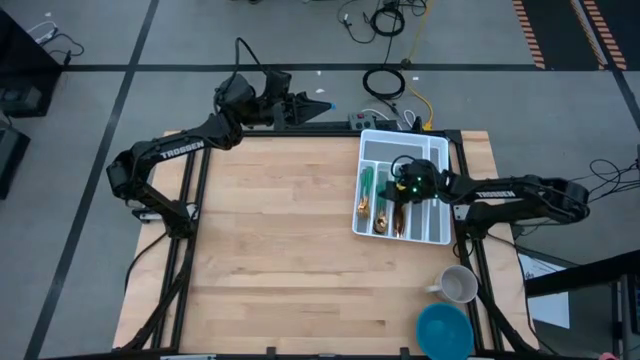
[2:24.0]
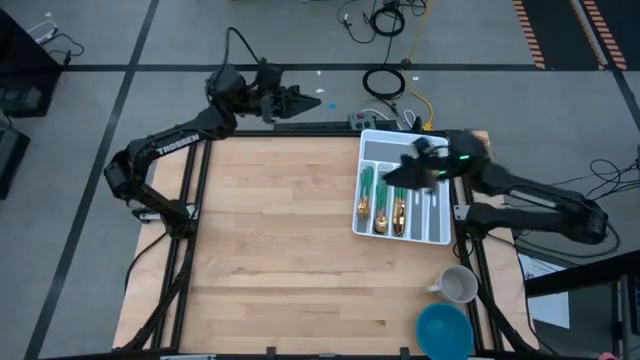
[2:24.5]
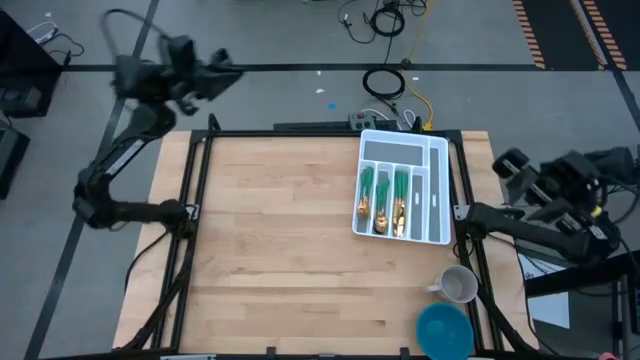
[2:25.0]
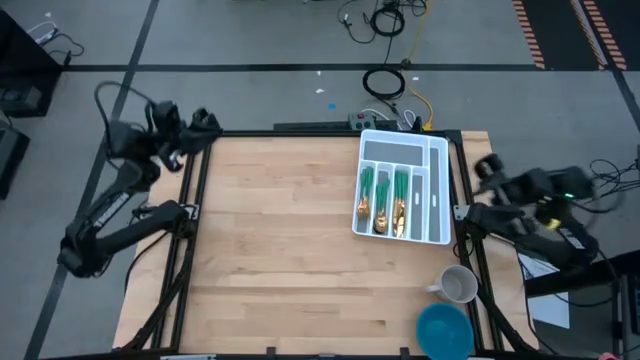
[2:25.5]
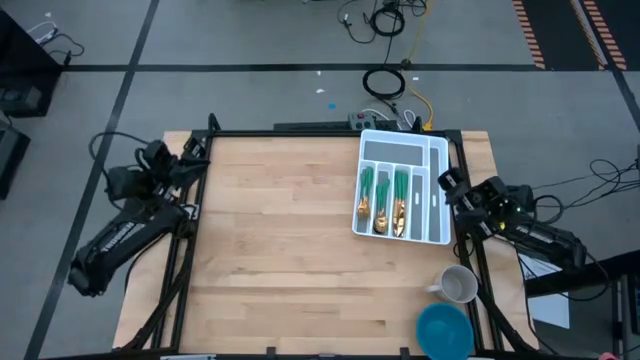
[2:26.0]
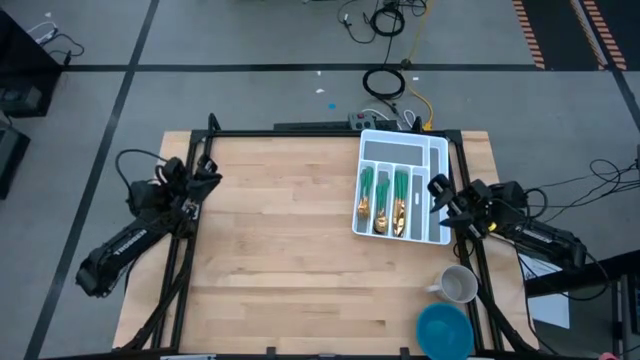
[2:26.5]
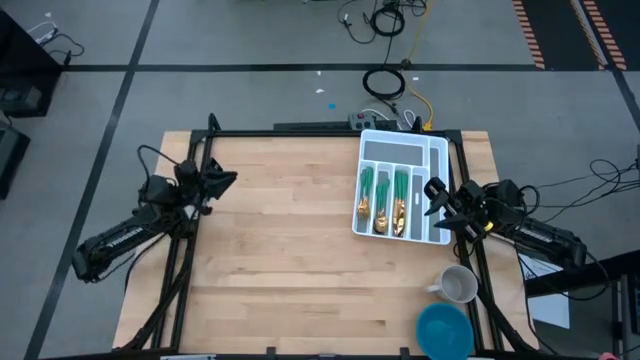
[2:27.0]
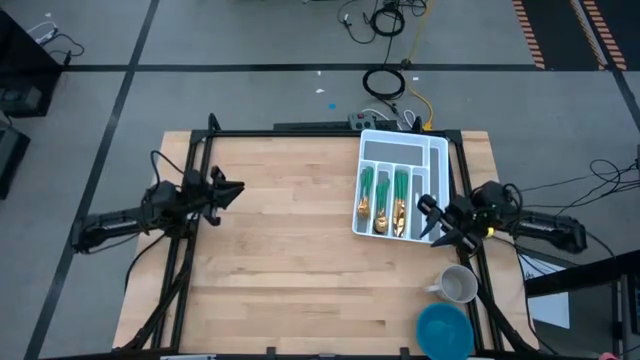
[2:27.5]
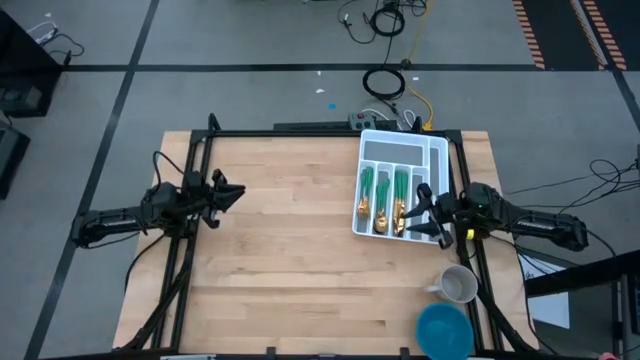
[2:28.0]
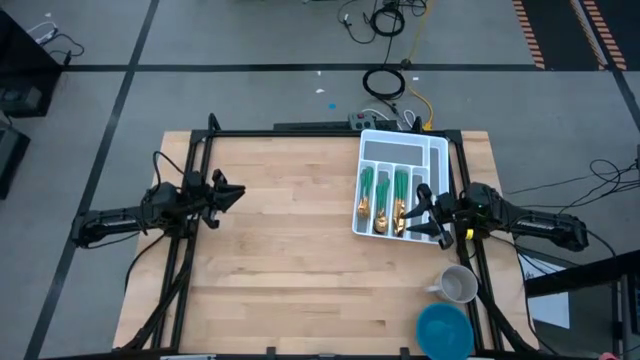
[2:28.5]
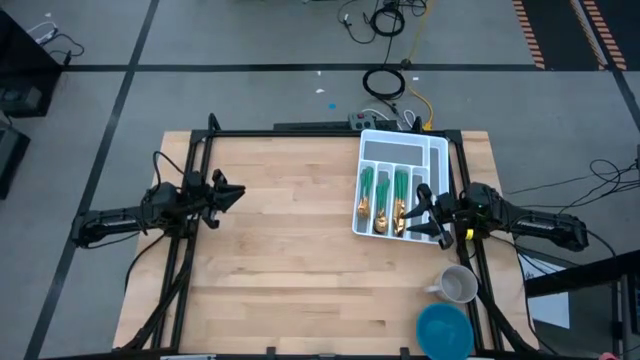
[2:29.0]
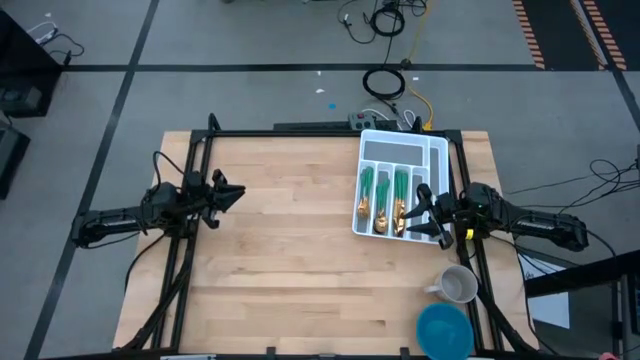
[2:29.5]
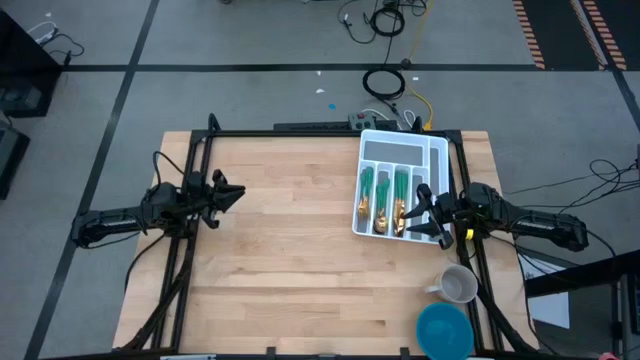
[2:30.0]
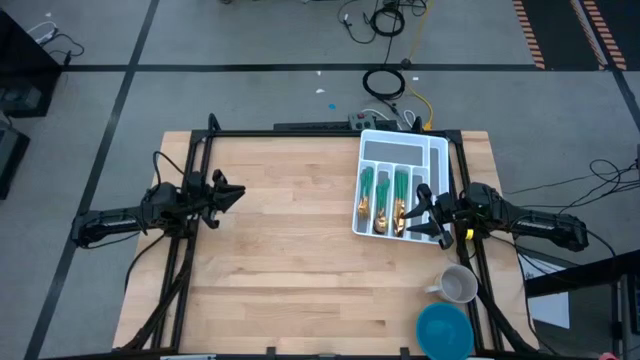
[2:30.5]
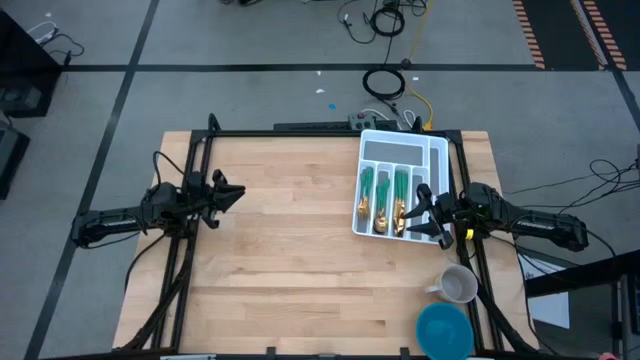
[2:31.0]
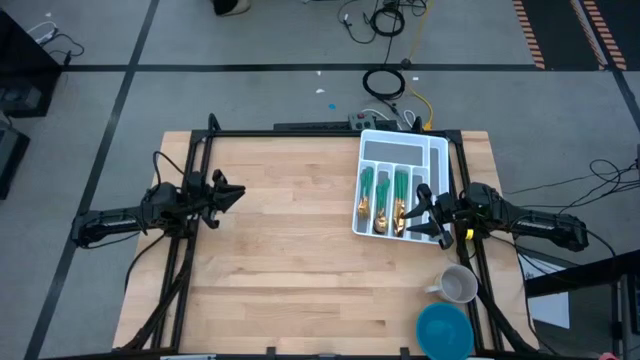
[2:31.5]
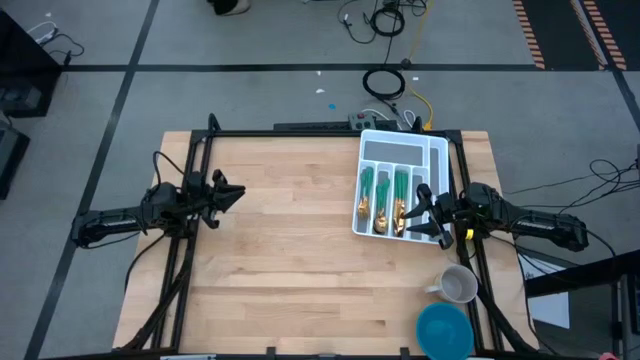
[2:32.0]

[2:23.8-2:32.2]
Task: Sort silverware
Return to Home Position

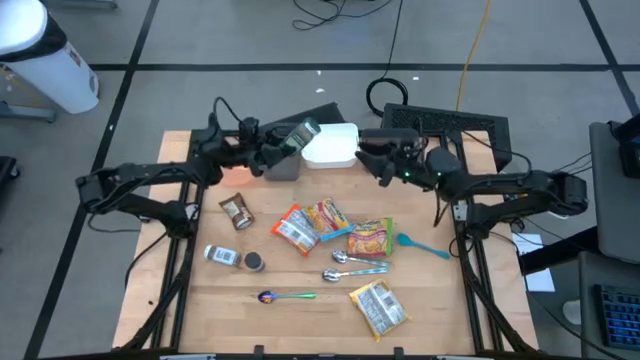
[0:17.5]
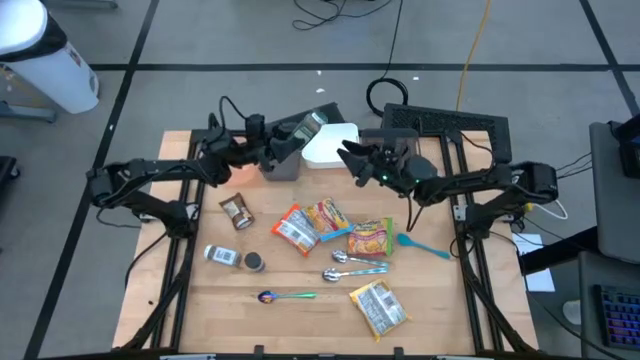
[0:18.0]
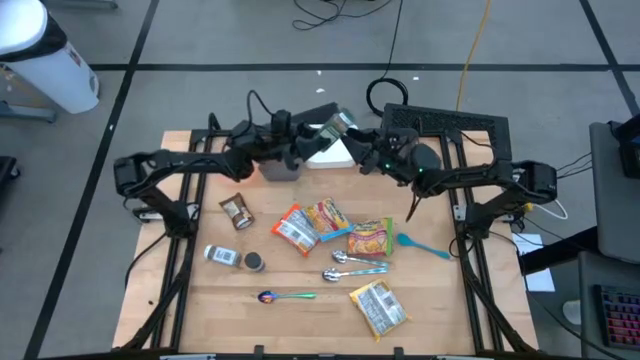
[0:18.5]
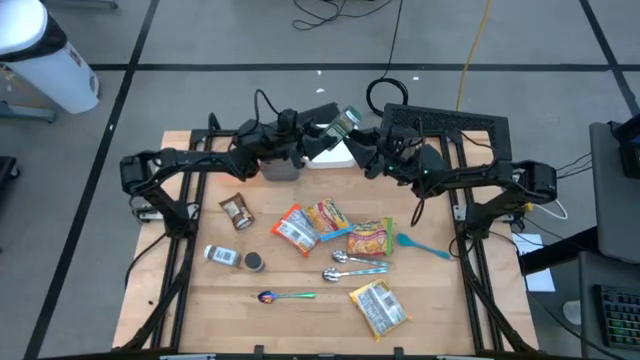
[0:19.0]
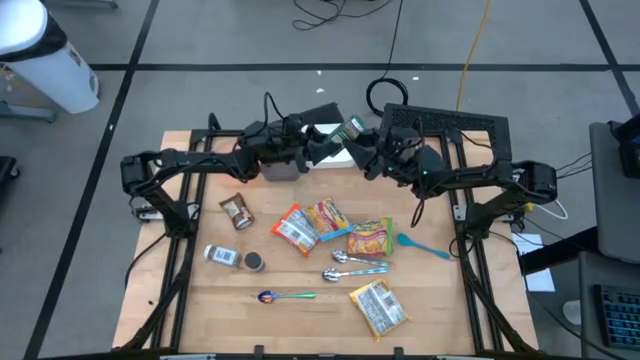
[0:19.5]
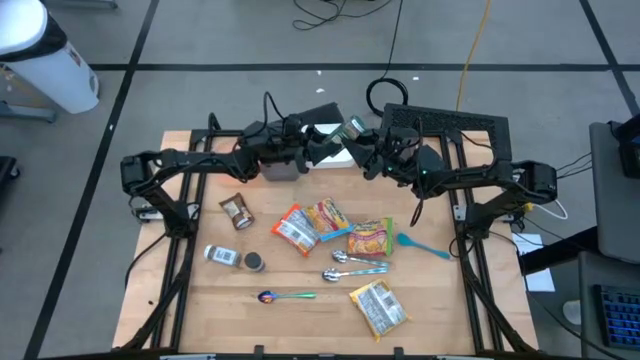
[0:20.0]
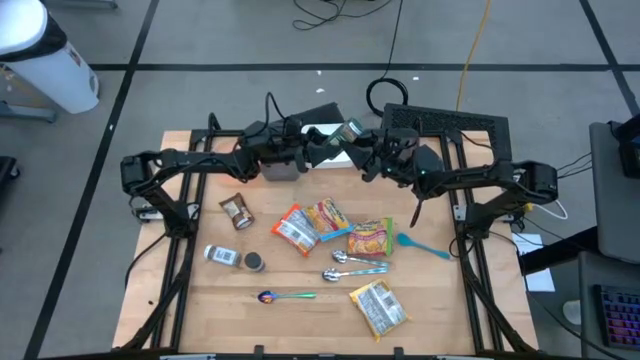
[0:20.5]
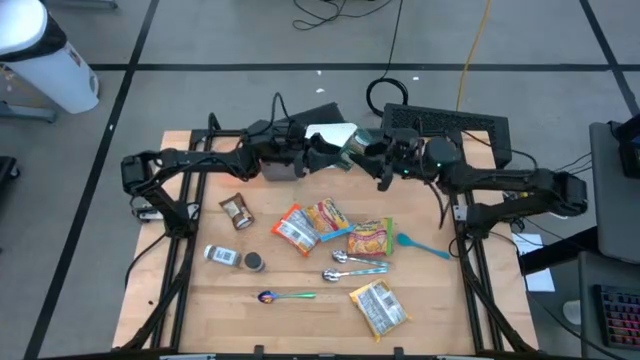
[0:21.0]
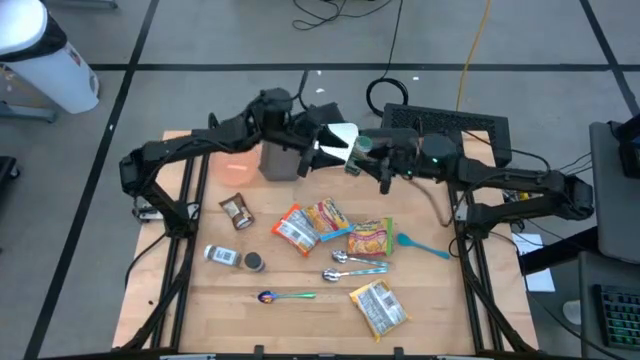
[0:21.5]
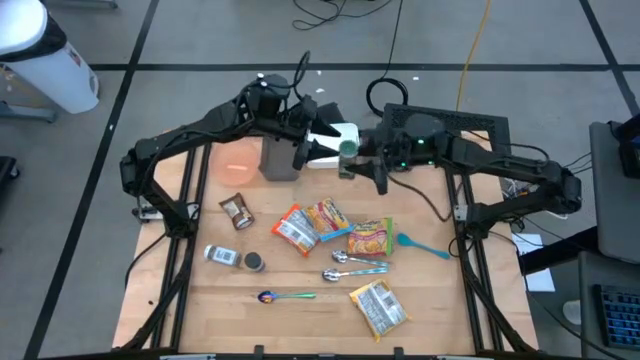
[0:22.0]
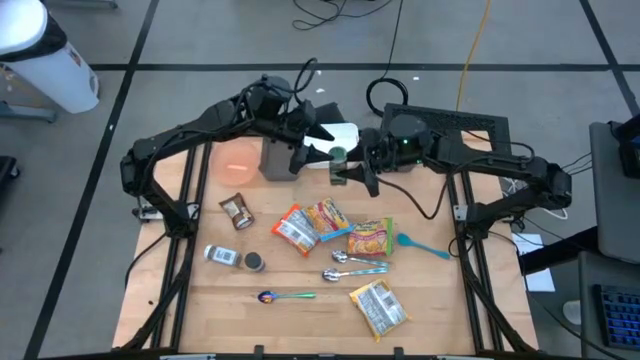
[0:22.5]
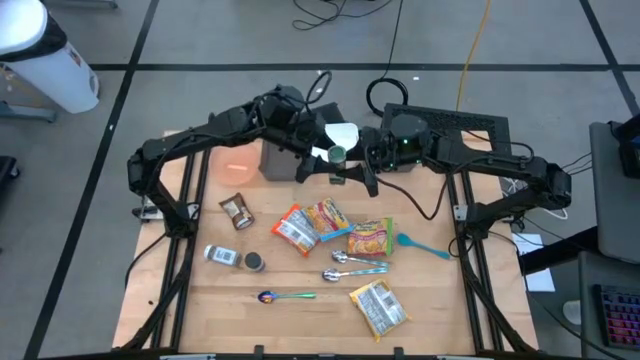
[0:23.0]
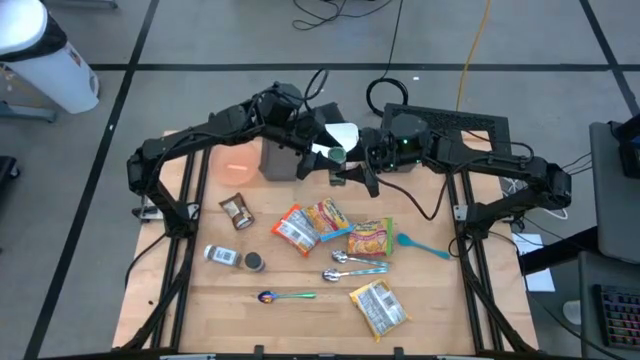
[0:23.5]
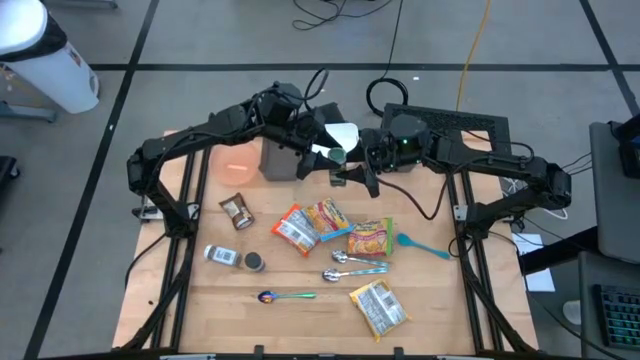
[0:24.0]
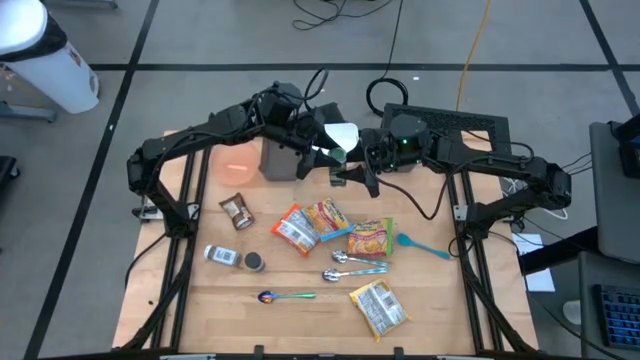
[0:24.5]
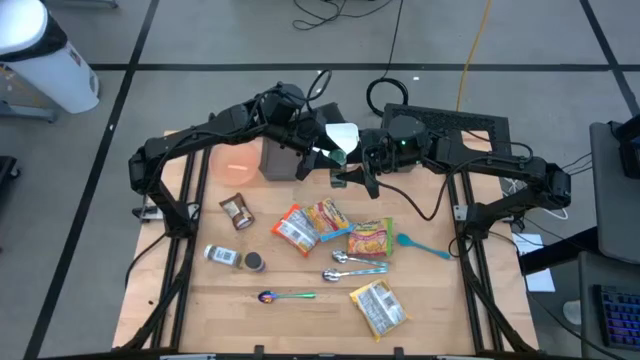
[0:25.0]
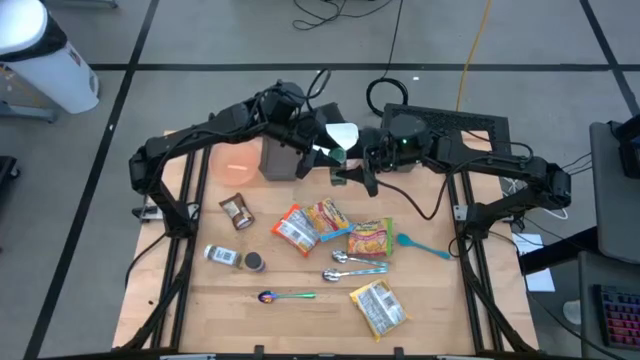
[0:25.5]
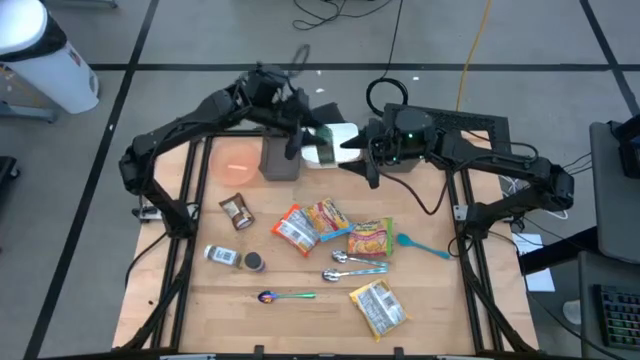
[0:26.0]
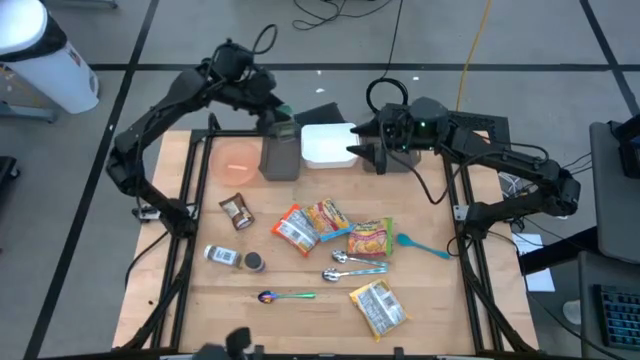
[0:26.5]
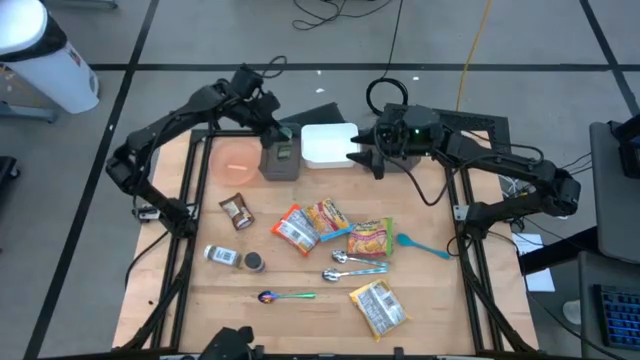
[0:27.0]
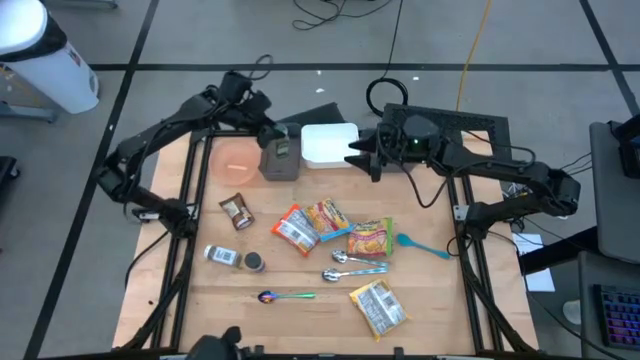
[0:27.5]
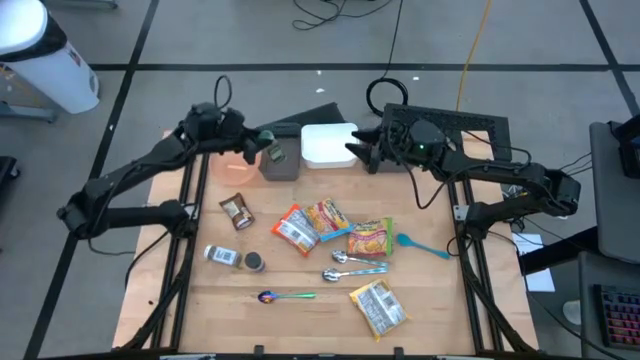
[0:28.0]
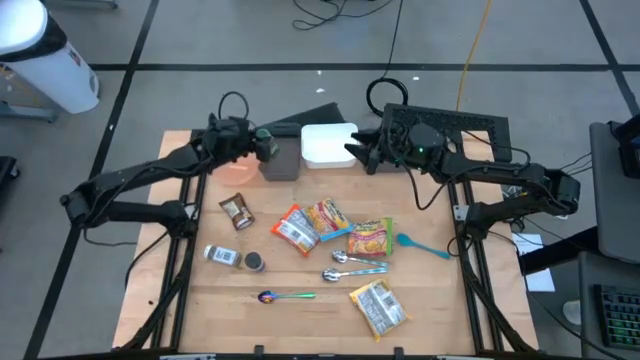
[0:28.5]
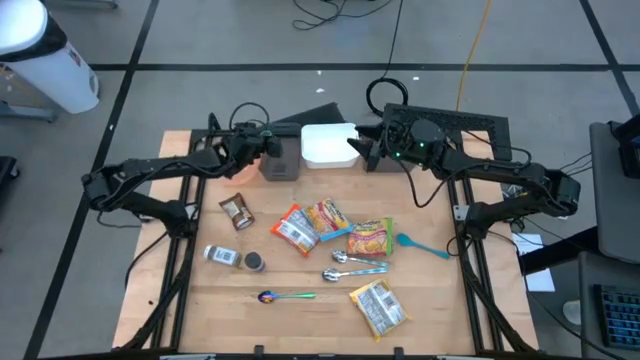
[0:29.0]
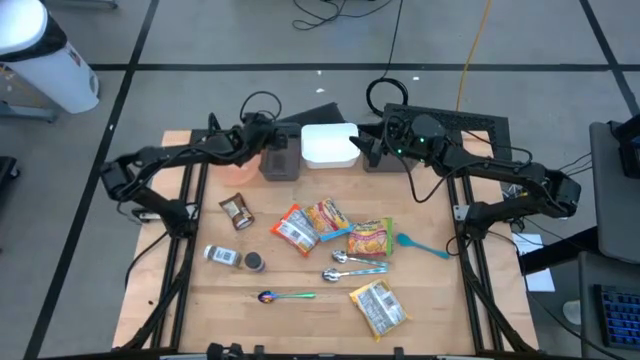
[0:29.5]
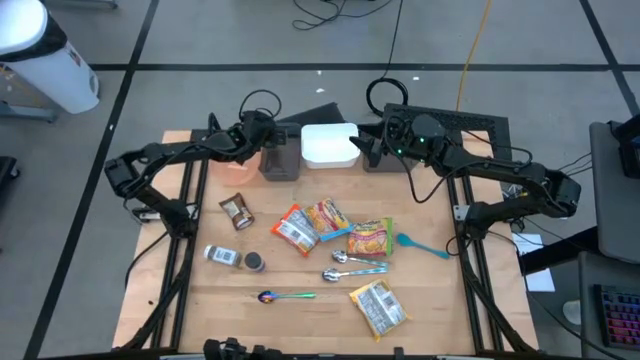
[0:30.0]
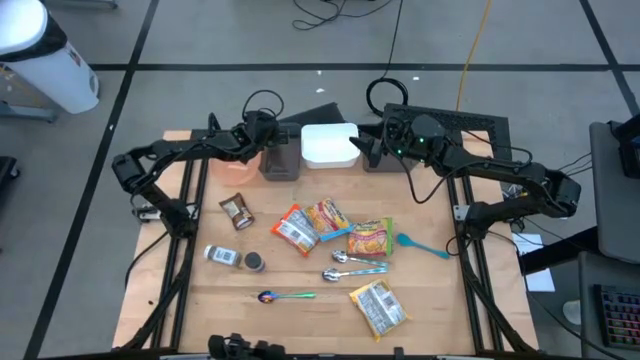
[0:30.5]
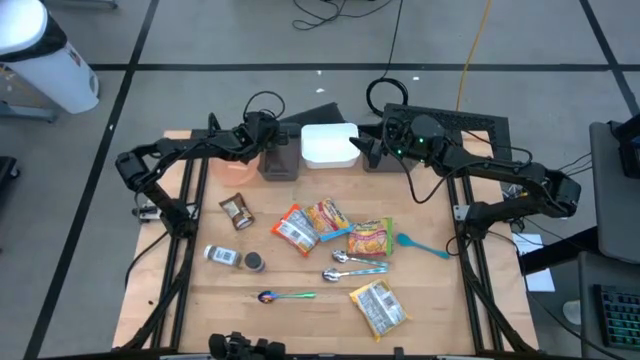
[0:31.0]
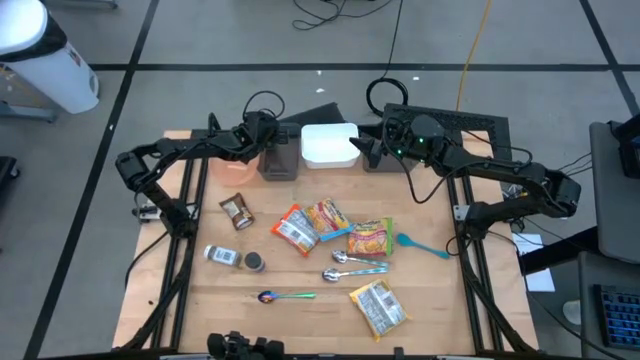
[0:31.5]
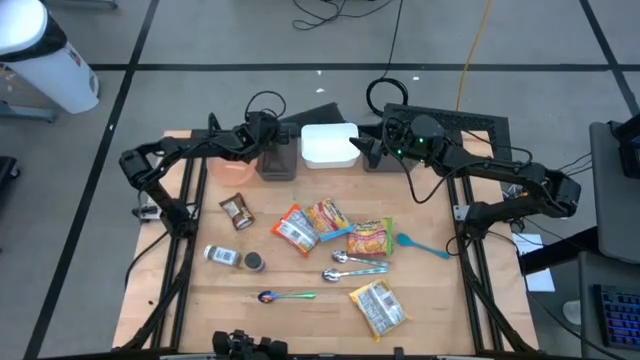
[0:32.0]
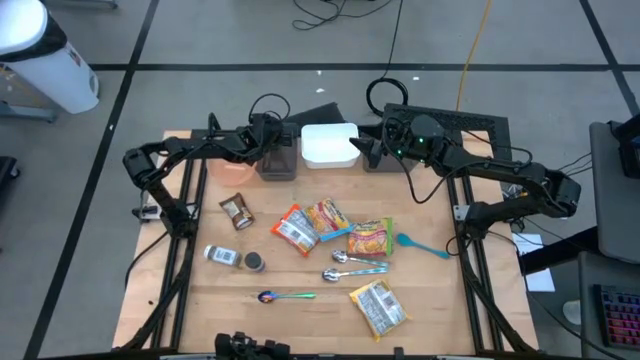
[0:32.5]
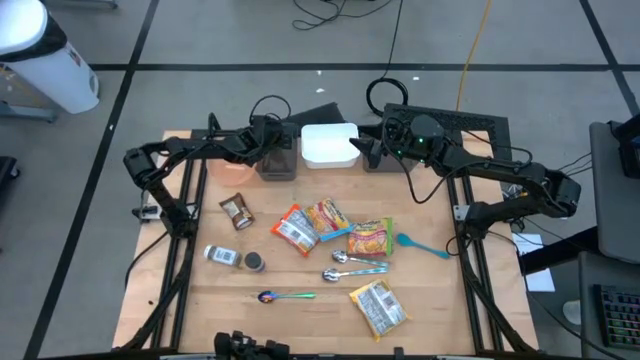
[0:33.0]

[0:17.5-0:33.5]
Task: Pick & Place Food Item
Put the green seasoning bottle into the left black bin
